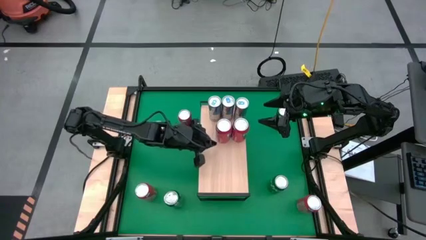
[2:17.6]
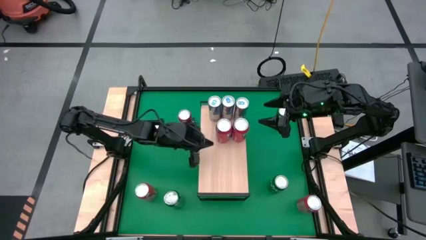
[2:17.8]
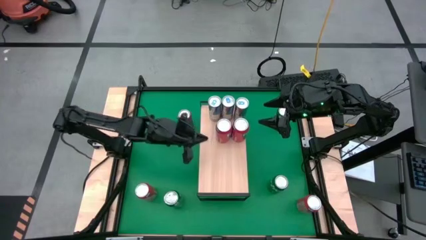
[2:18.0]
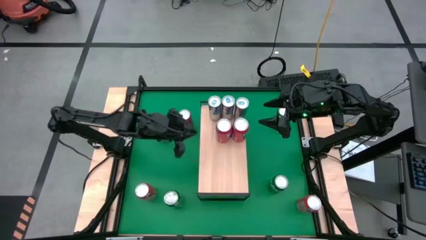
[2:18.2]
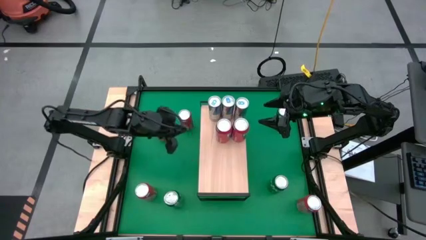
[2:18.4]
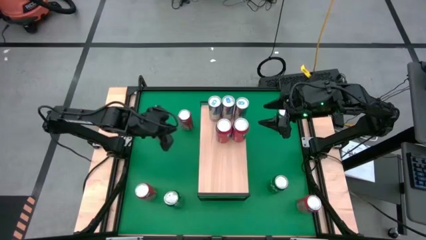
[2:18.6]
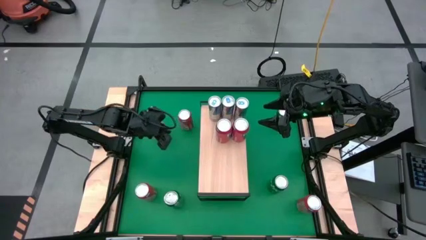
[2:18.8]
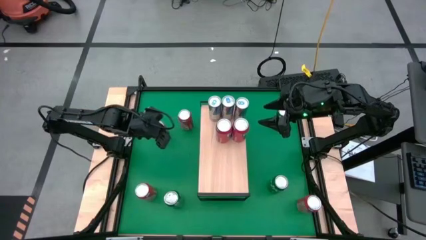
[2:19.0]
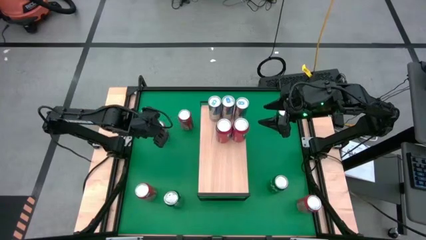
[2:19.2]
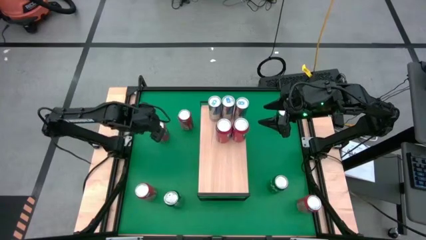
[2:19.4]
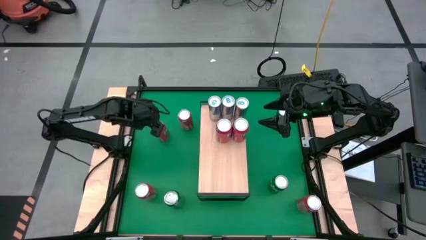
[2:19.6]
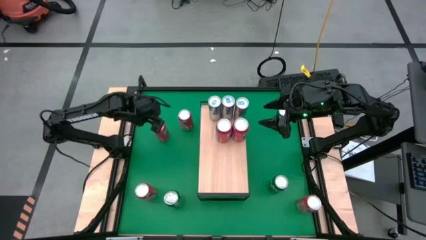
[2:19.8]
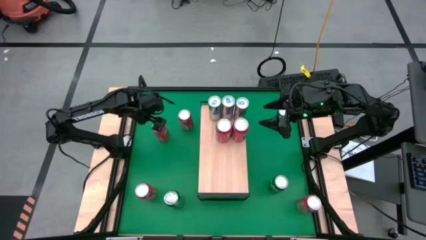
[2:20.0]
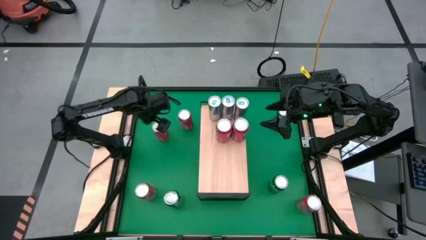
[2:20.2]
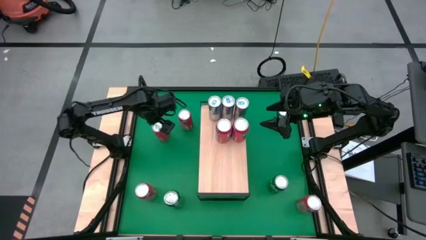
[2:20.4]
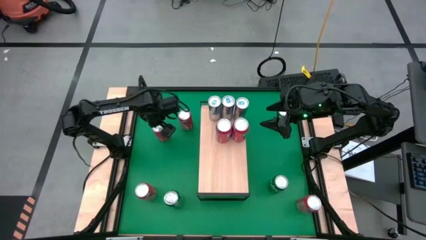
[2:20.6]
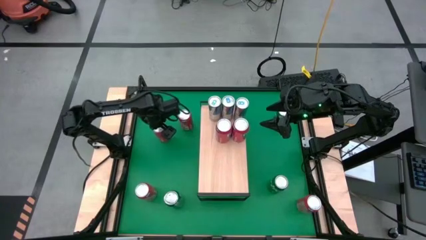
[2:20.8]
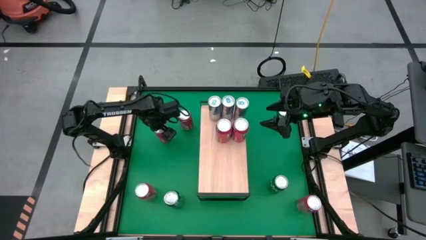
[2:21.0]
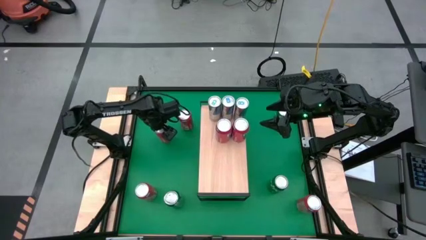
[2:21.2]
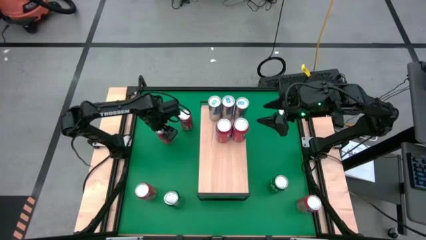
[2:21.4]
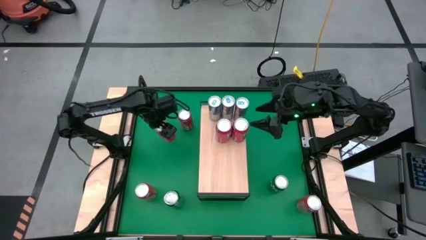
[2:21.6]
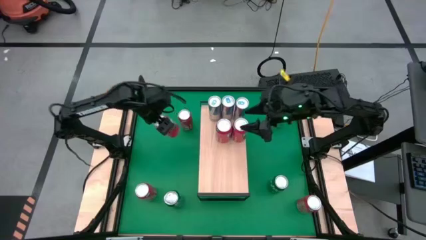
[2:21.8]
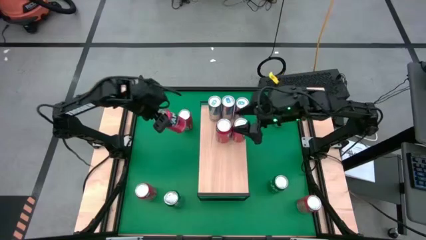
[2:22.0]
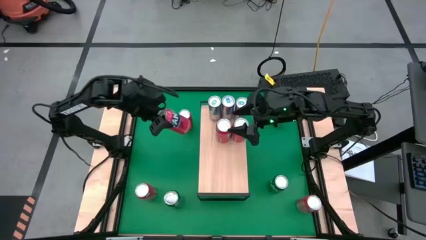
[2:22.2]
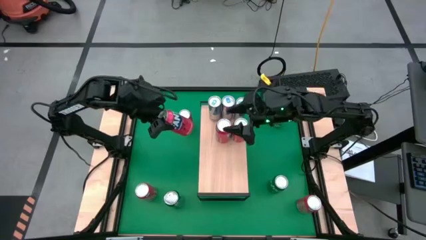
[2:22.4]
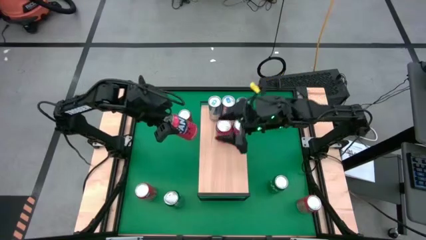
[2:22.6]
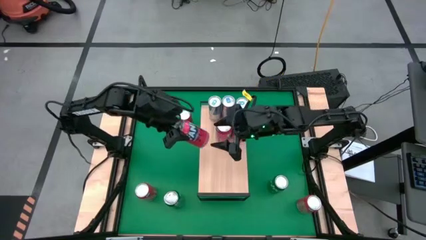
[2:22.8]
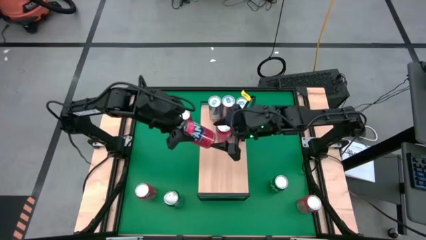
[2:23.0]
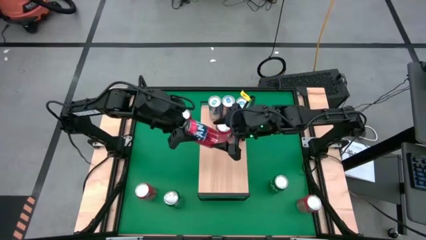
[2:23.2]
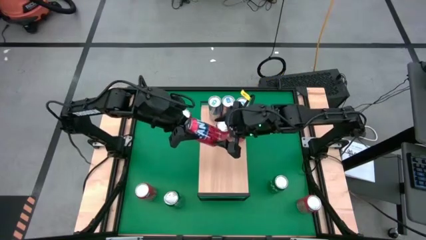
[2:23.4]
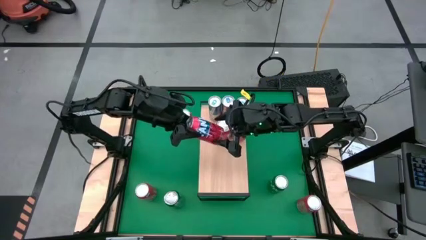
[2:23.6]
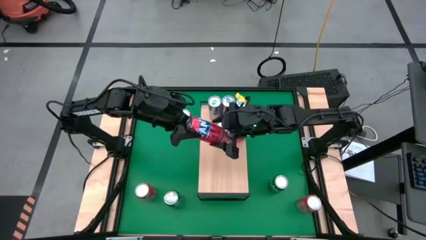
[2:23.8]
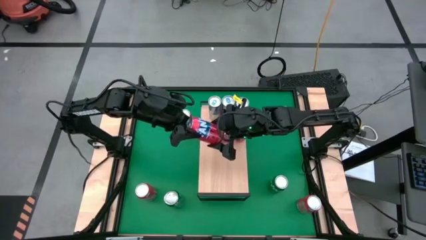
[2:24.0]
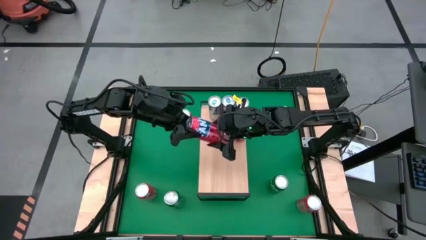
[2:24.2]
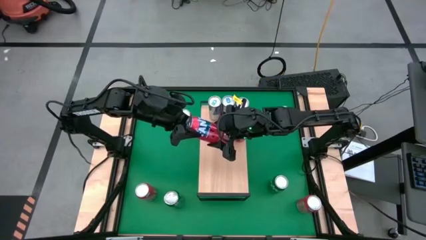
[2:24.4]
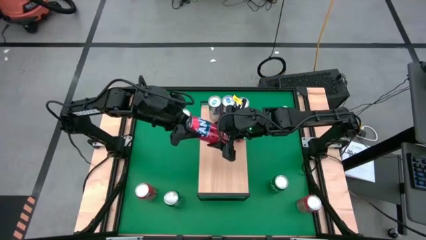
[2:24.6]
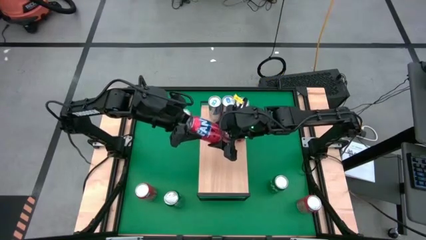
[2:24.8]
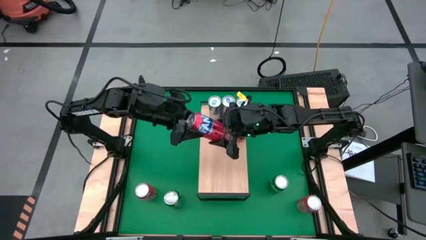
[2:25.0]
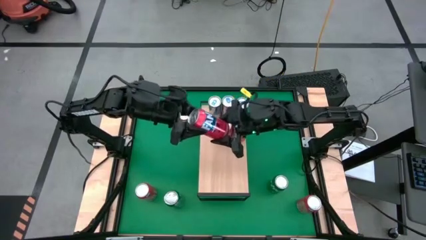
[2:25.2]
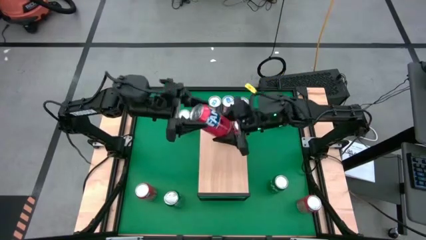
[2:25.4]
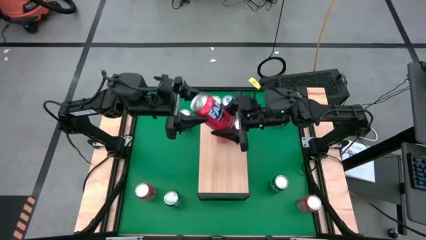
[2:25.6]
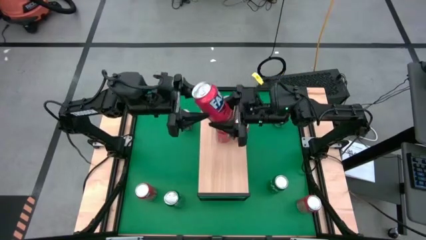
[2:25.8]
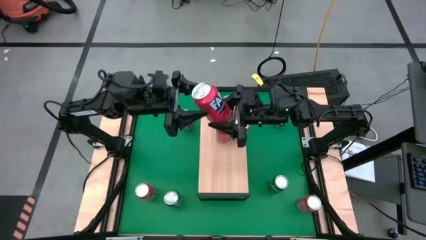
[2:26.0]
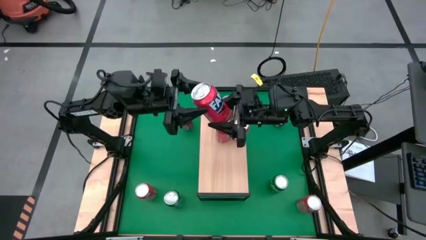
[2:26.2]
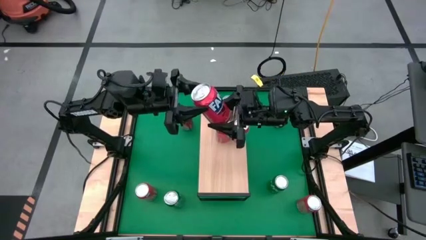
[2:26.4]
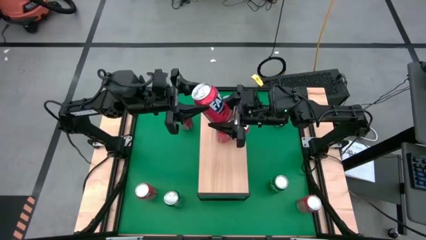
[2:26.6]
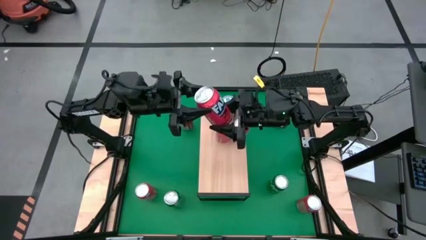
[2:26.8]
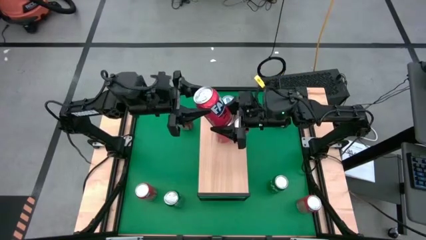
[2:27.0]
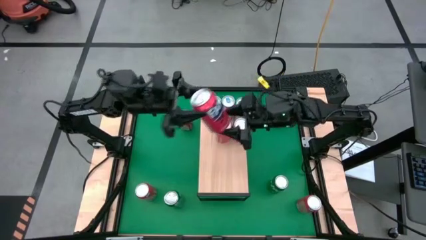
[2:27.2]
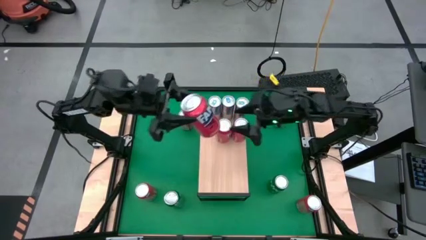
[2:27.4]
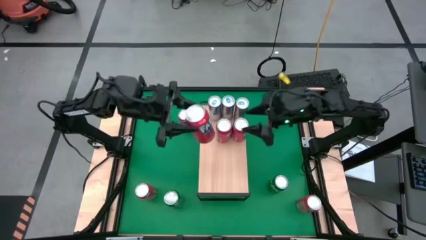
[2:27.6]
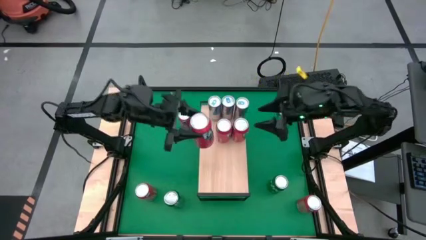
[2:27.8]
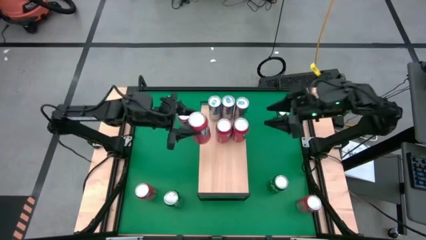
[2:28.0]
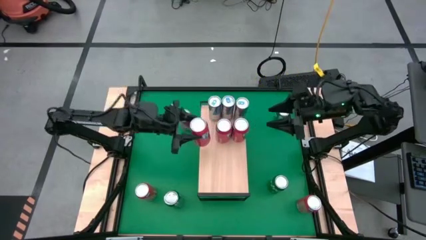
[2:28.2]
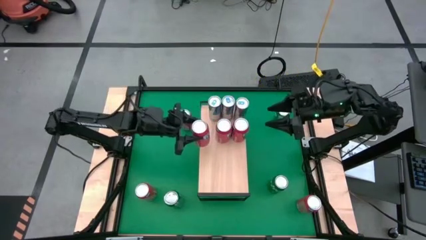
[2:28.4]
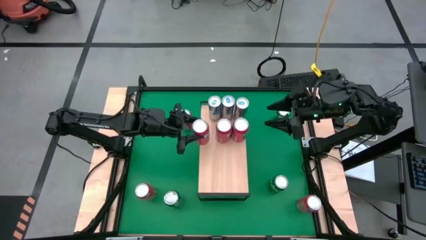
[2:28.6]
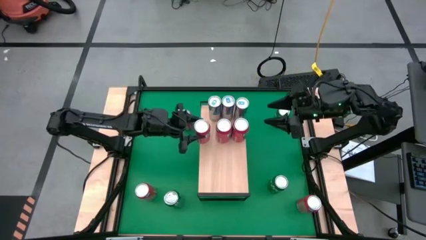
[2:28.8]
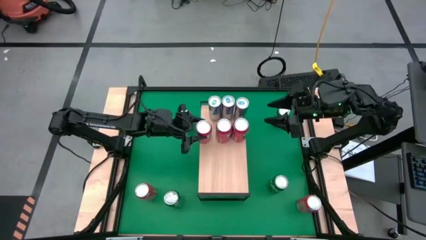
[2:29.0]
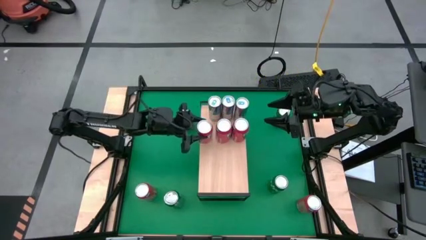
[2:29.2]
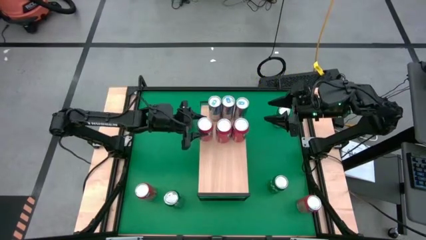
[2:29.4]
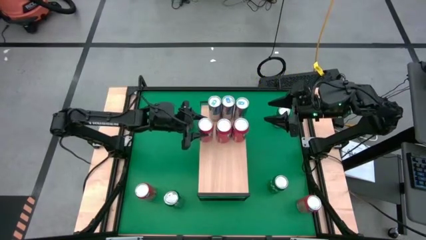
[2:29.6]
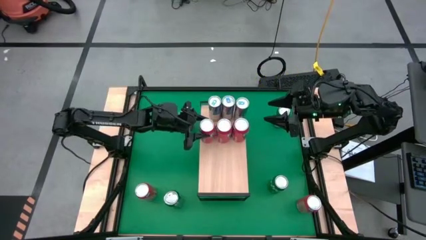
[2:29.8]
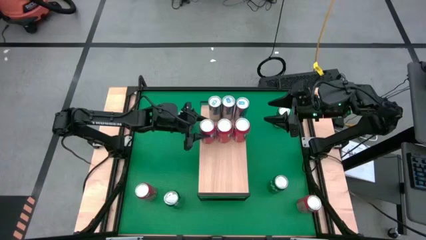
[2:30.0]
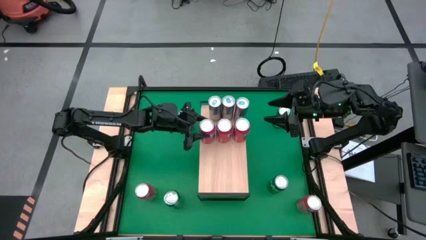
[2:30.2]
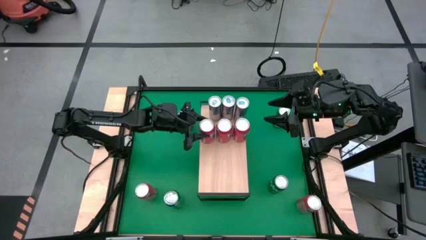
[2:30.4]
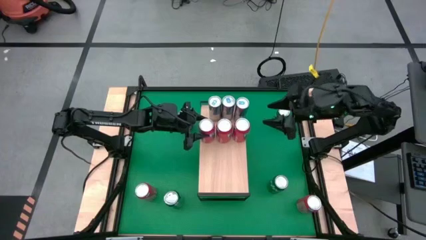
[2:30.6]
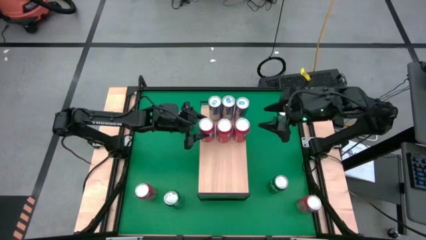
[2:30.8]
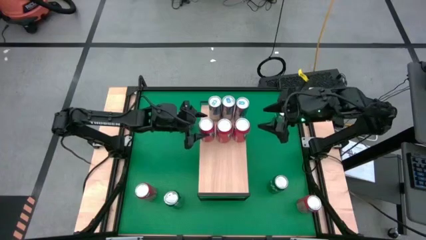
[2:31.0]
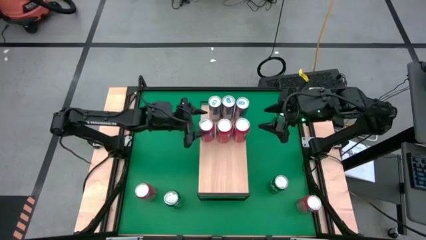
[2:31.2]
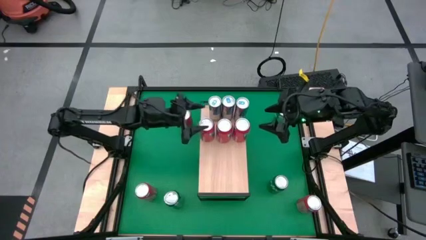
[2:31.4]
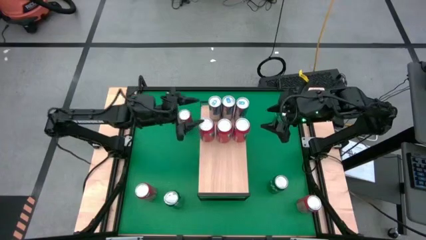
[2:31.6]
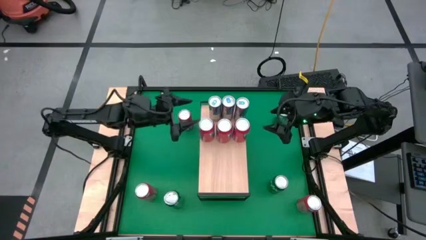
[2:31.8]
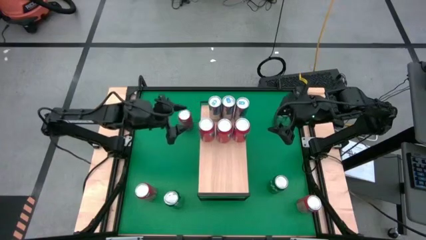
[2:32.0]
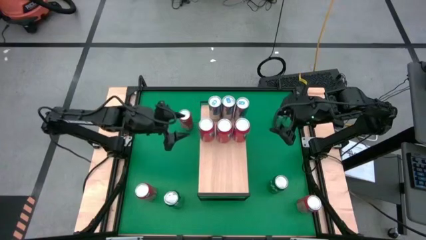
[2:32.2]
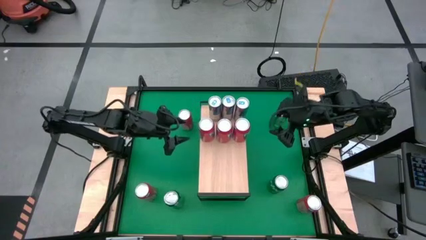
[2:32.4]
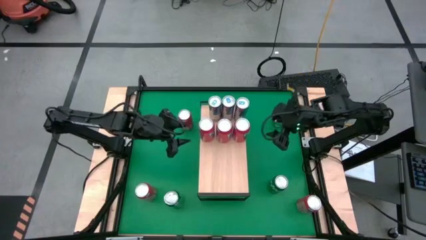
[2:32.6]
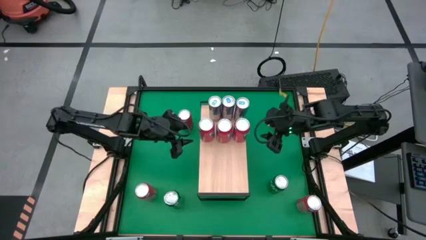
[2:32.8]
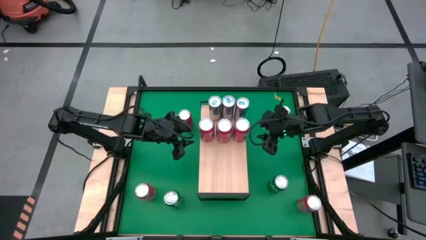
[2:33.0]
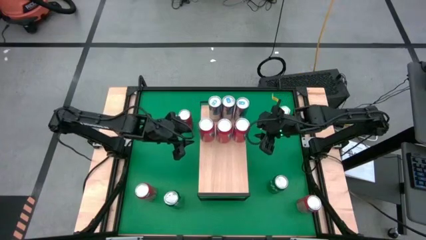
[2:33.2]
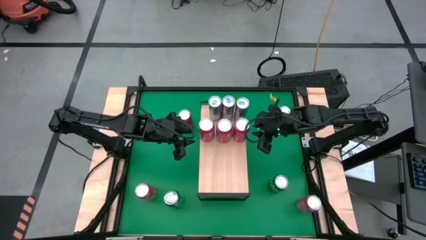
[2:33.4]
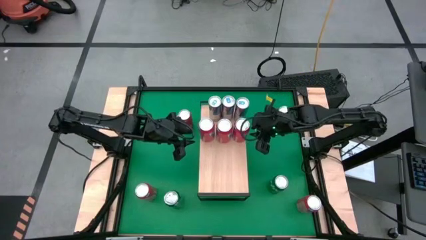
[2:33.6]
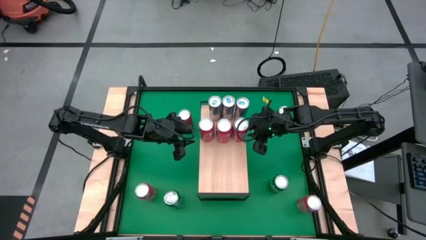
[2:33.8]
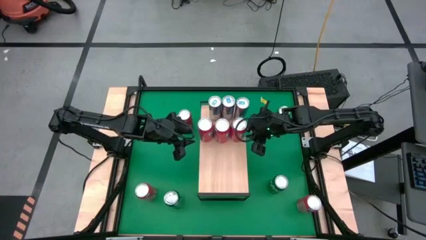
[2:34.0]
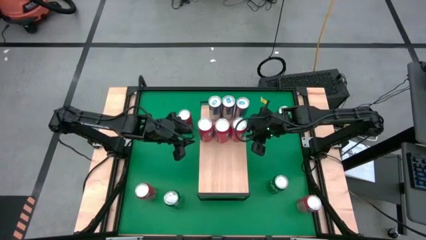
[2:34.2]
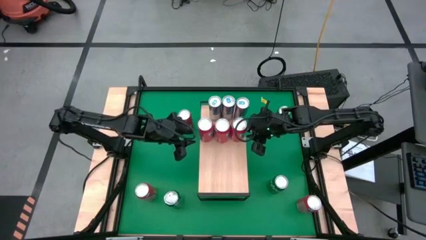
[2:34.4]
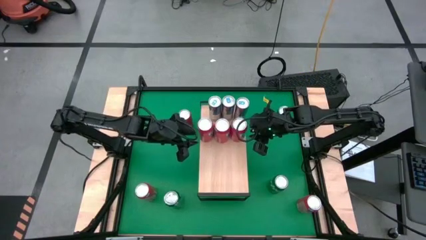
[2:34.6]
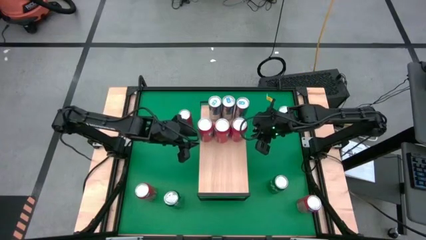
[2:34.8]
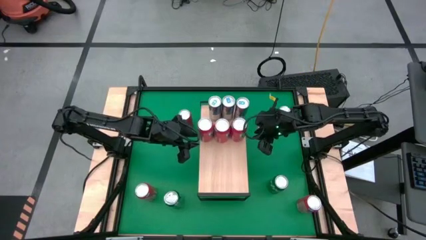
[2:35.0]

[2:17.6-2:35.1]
Task: Place canned beverage on shelf
Put the orange soda can on the shelf aligned with the other orange soda can

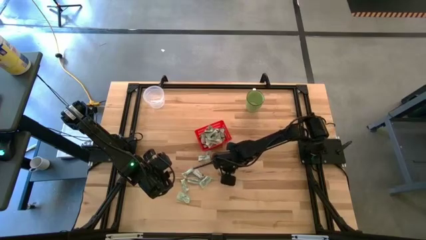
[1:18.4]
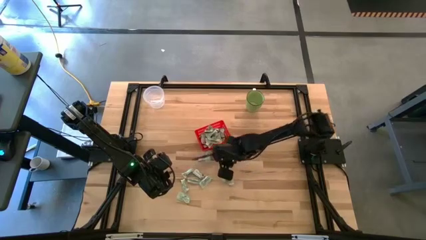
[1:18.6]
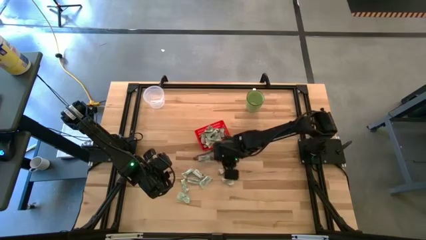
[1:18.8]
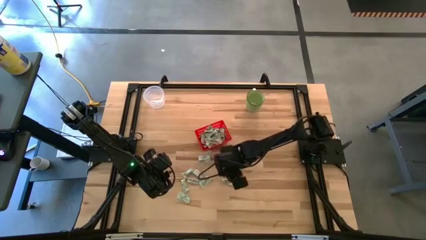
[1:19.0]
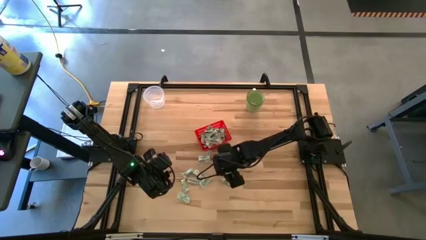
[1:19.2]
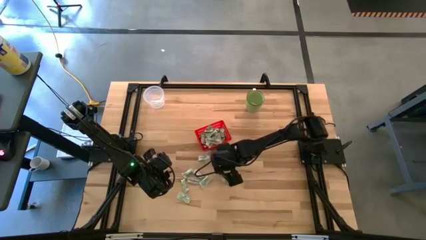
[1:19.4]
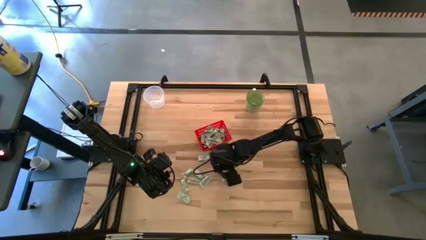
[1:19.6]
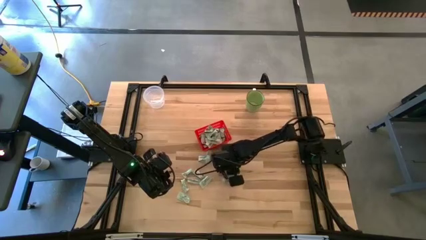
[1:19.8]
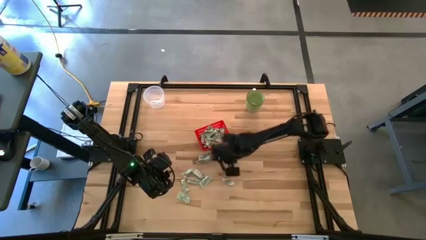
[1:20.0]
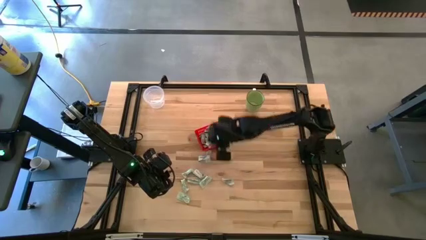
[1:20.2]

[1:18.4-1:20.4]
Task: Pick and place Stevia / Truvia into bins
Put the stevia packet into the red basket
